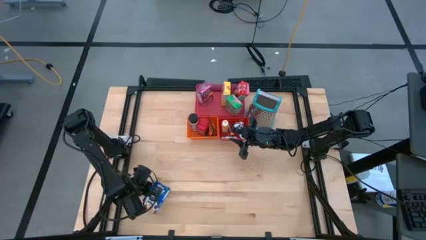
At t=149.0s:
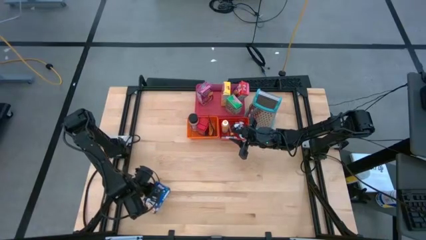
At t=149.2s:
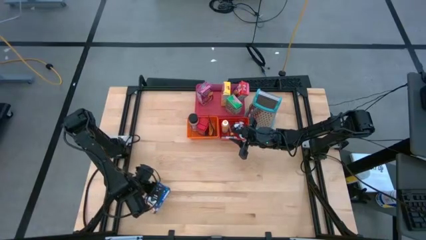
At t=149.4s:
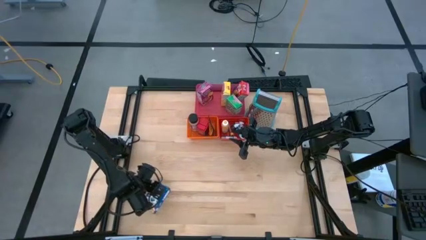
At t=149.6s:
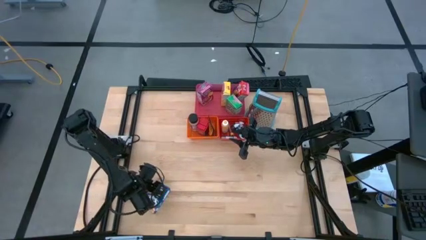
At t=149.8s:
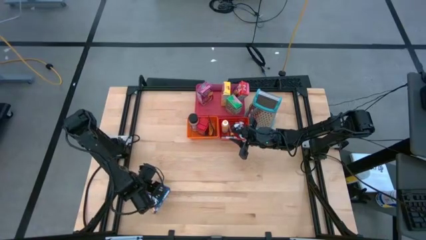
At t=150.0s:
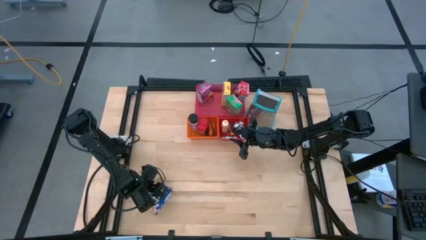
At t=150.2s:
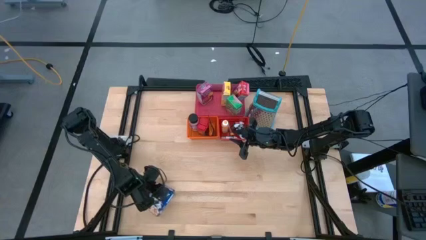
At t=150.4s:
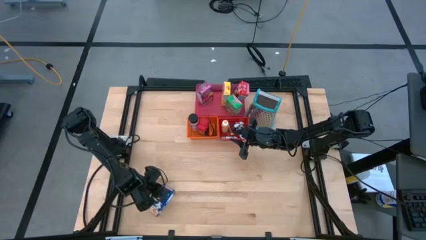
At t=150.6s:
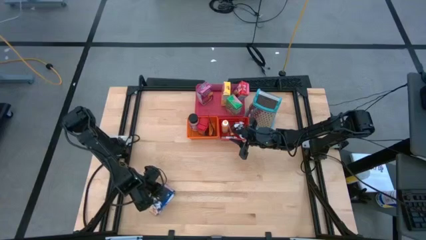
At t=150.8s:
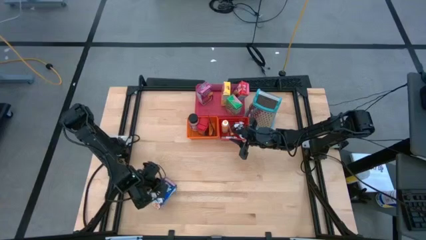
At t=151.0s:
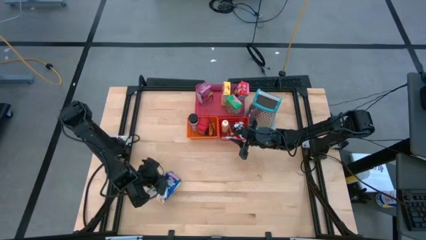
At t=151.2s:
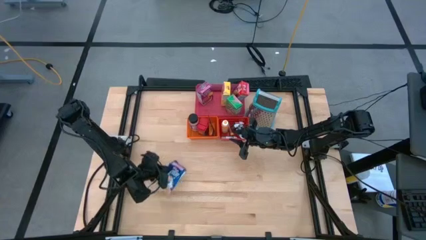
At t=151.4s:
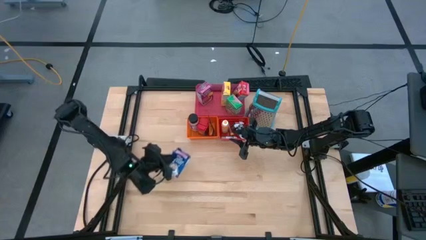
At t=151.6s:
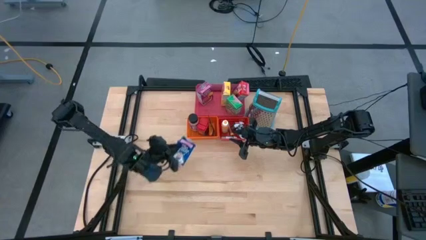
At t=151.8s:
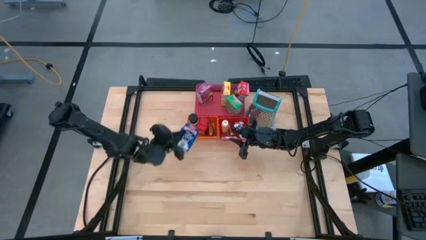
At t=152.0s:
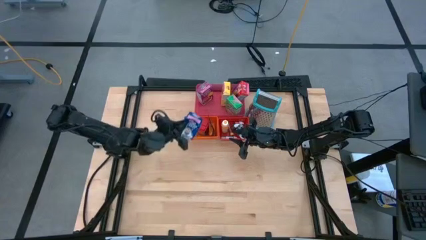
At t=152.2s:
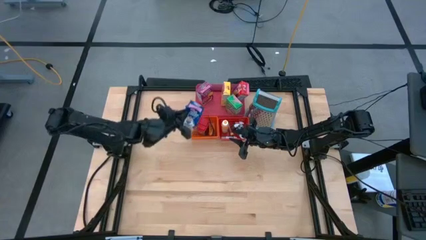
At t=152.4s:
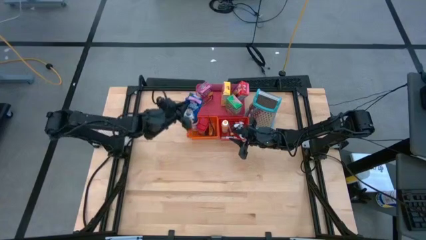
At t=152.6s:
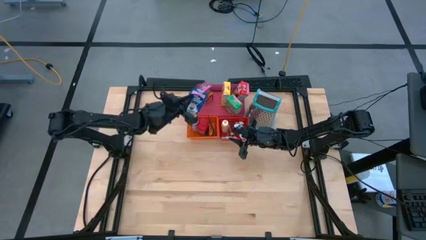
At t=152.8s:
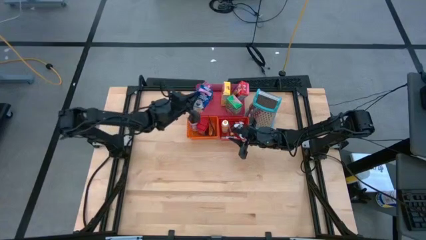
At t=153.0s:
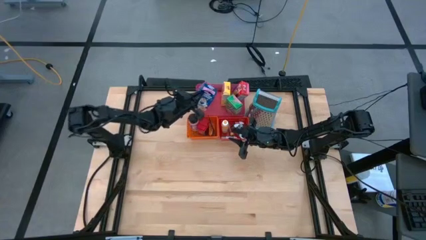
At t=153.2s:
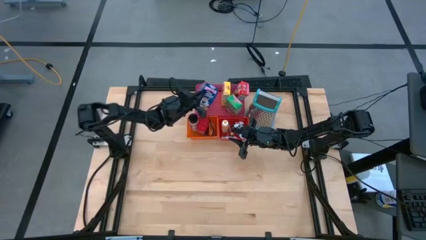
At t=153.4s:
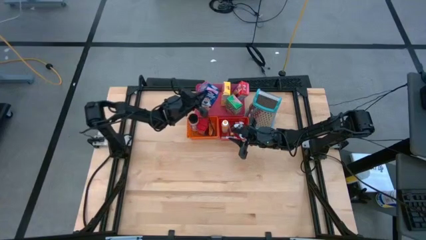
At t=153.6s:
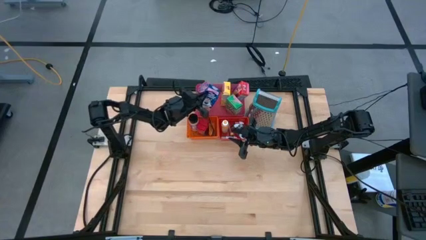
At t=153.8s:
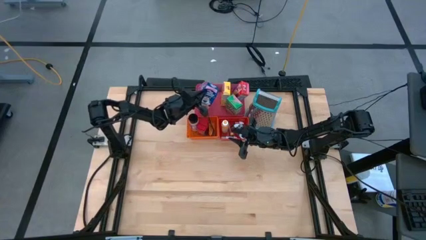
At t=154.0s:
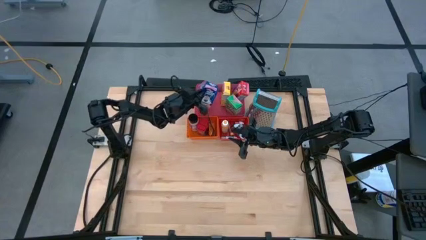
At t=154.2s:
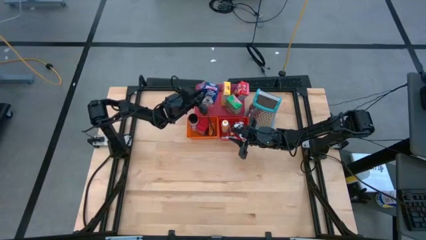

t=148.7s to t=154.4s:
Task: Pick & Place Kitchen Items
Put the blue cereal box into the pink bin

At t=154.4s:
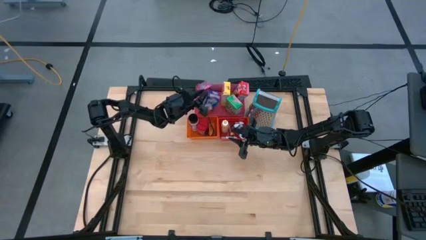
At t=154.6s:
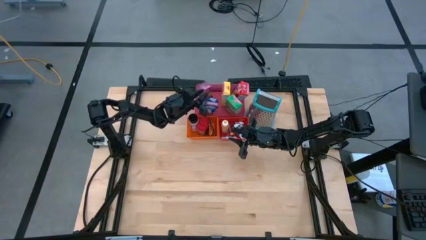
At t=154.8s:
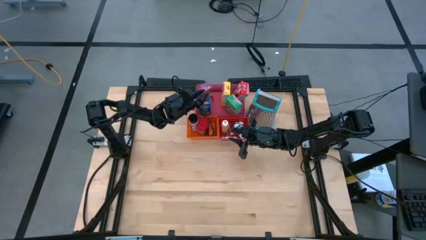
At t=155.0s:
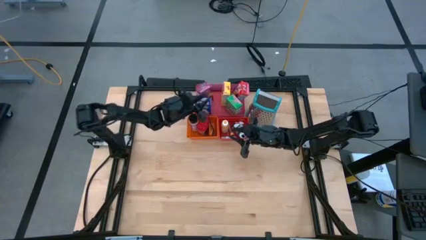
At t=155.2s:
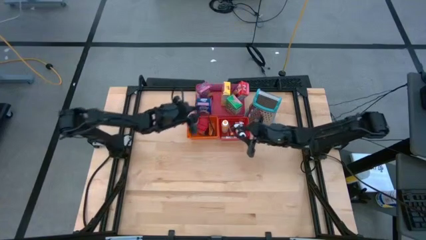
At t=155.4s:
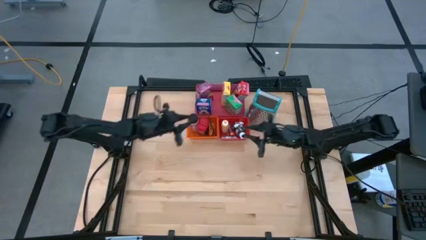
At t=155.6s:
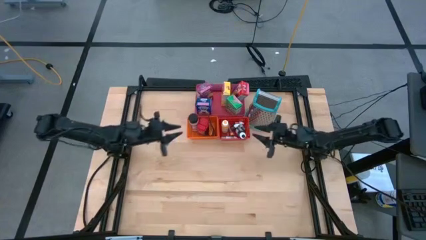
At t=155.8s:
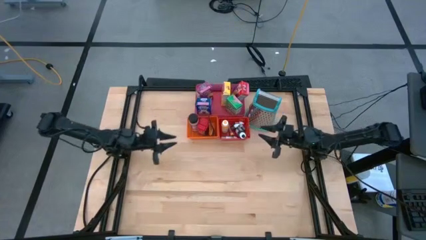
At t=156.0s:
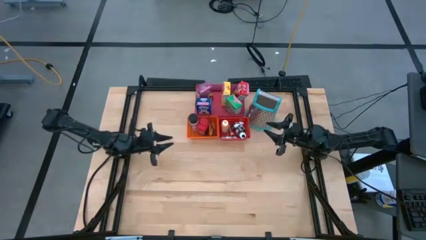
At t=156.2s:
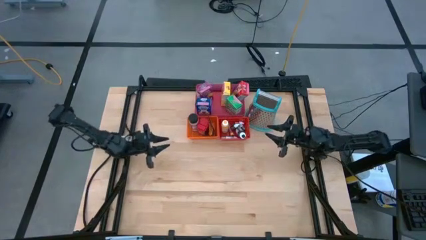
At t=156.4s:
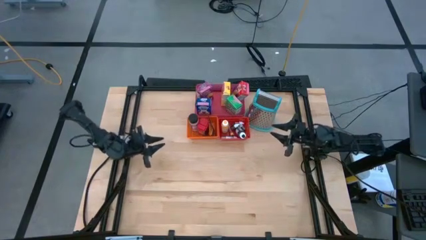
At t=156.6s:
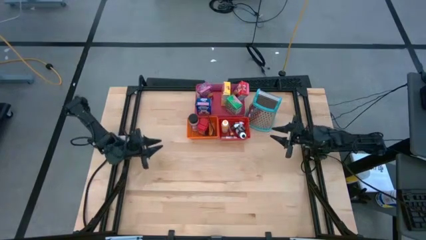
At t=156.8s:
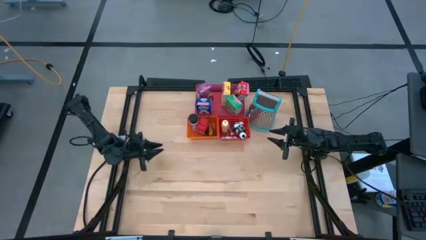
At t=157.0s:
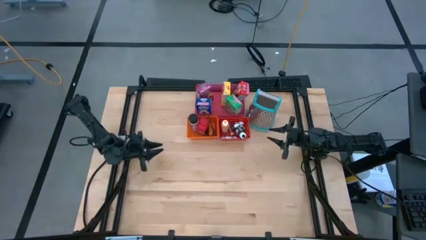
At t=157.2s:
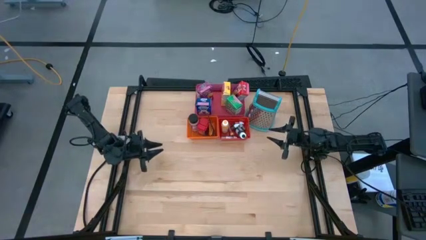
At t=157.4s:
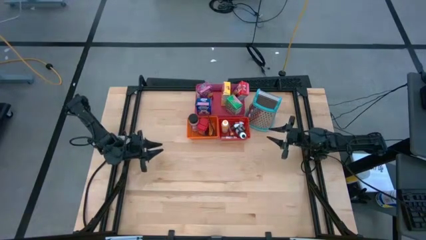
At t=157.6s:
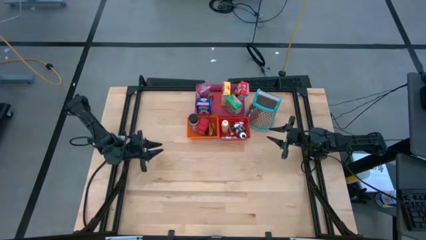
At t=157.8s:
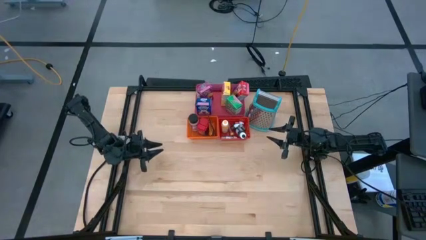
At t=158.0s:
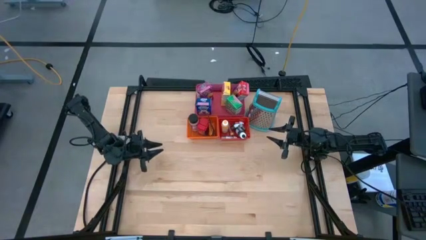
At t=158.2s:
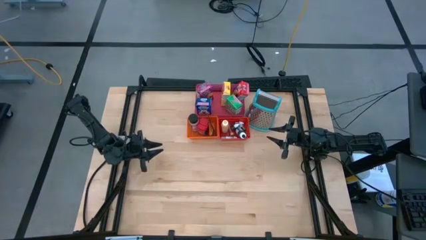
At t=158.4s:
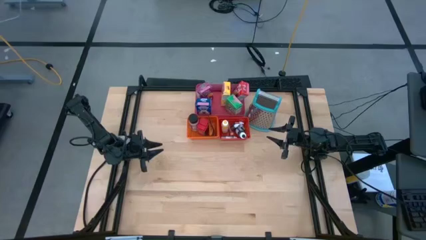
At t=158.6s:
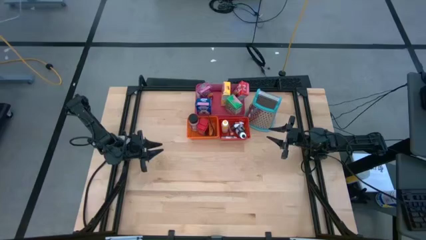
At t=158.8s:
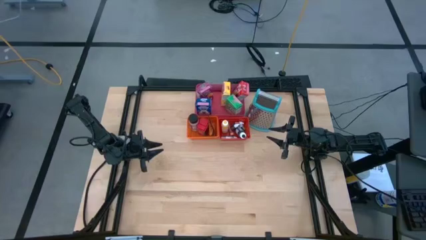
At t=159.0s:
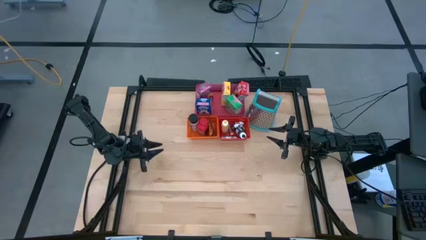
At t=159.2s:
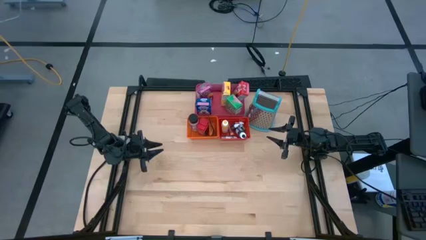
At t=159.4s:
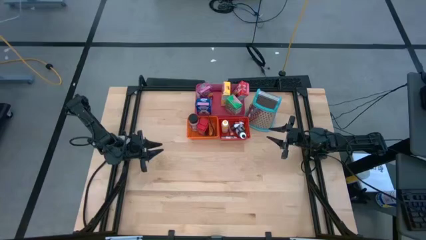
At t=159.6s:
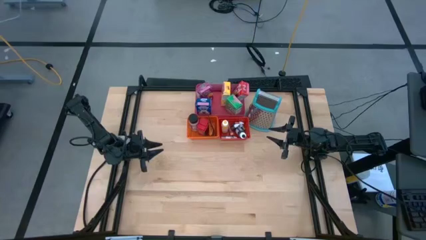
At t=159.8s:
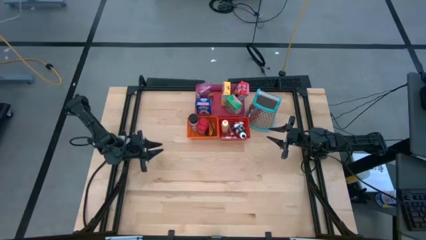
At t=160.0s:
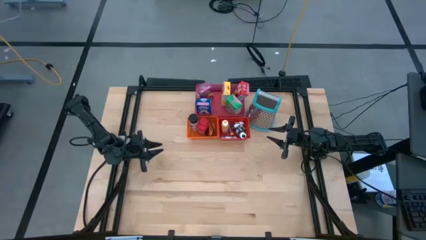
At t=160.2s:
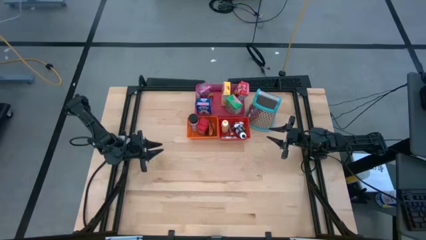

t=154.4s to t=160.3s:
Return to home position

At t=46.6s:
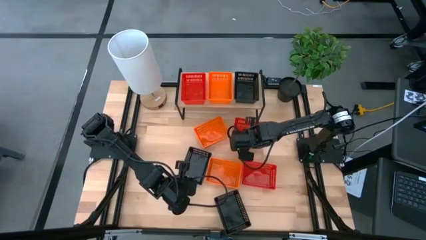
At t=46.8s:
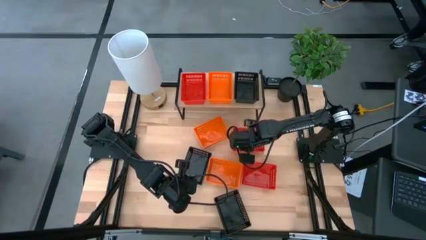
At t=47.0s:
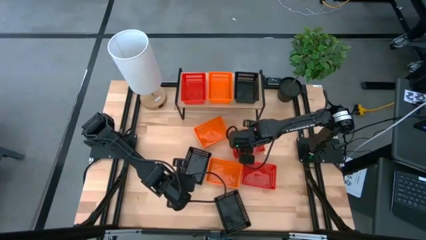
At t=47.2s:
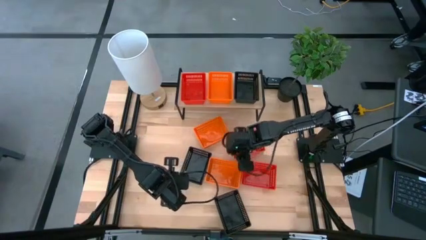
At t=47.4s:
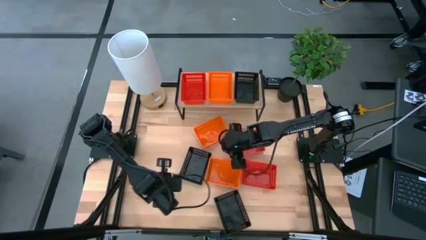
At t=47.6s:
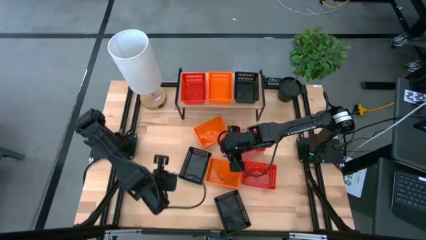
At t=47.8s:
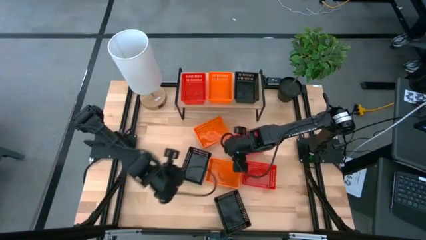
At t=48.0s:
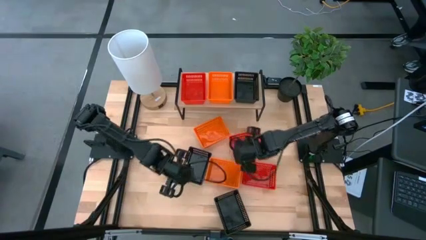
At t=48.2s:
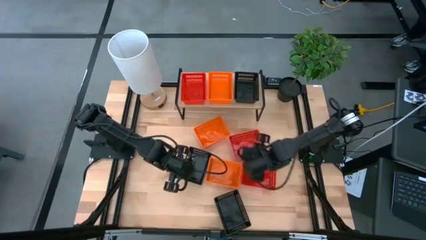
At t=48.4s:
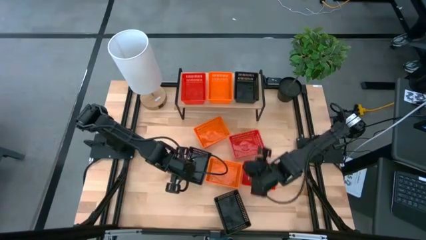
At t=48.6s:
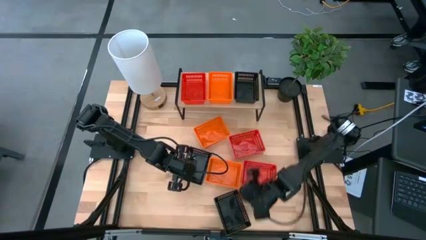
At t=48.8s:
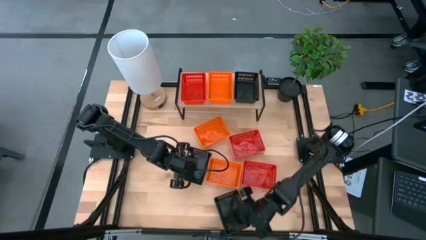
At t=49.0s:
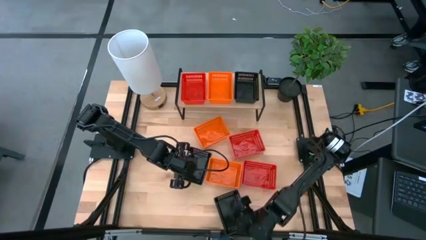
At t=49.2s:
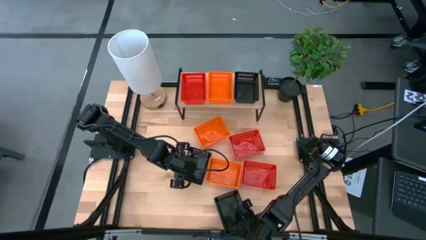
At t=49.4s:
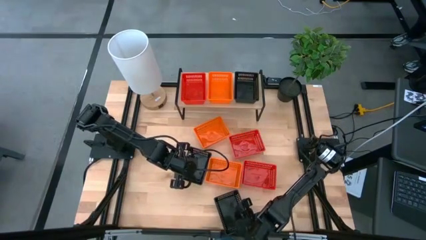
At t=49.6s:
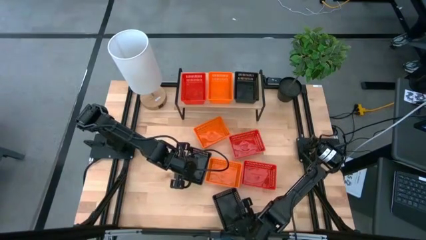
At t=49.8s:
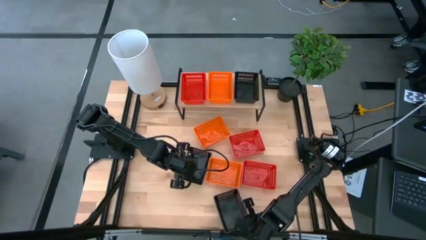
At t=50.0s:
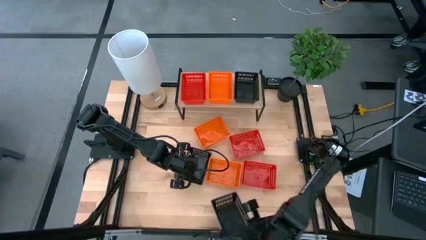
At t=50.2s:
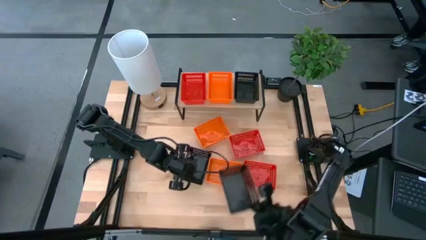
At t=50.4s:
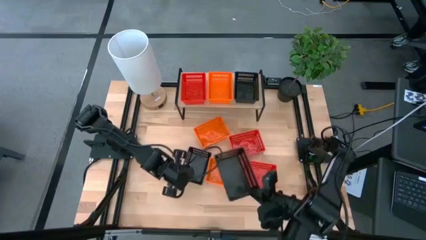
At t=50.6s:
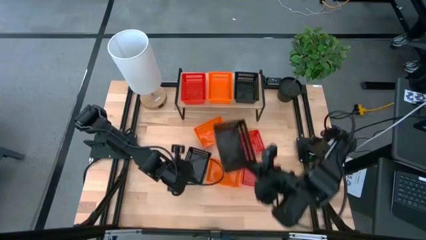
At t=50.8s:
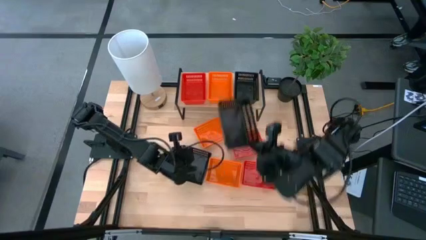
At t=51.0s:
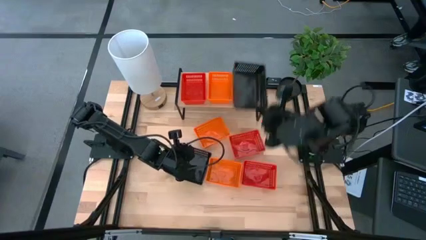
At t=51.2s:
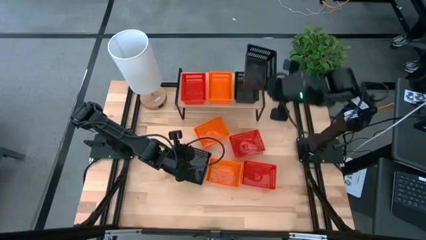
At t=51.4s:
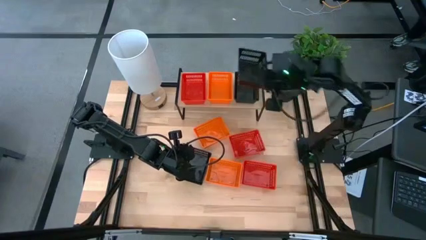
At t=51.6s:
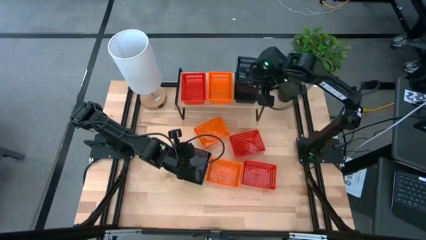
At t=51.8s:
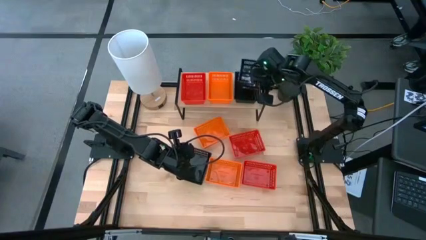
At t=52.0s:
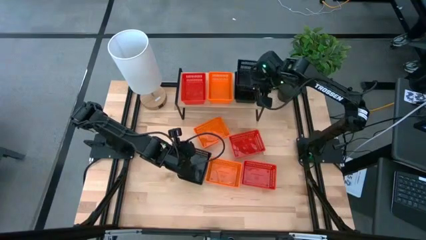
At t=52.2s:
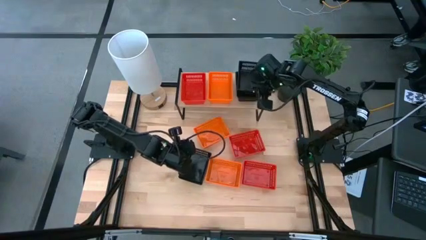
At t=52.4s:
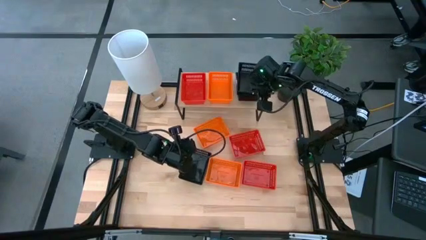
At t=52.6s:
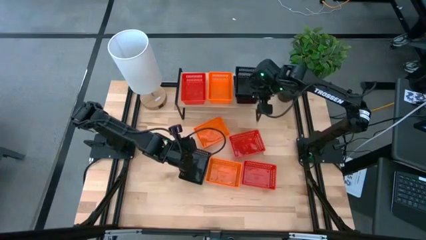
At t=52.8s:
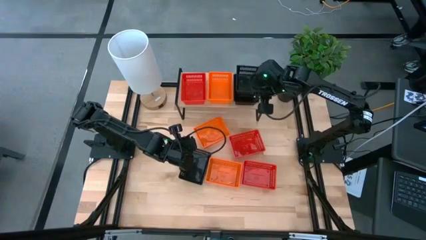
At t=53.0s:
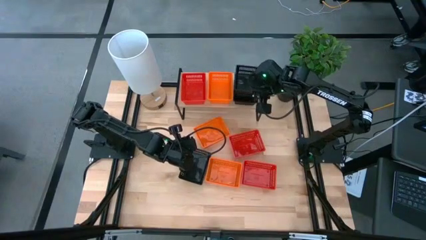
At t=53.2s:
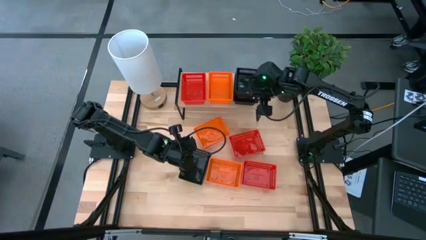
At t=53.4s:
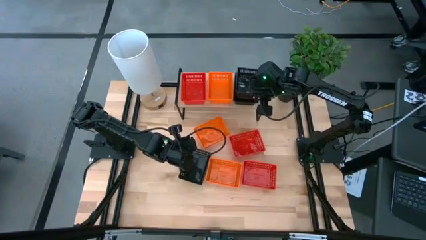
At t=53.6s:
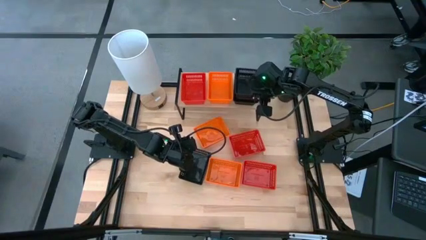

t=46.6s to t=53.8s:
Task: Stack baskets on shelf by color
Stack the bottom black basket on the black basket on the shelf
